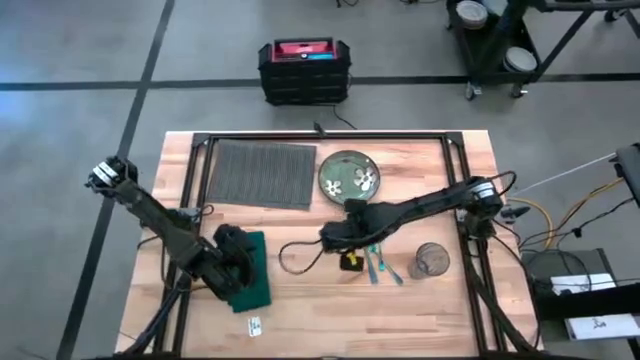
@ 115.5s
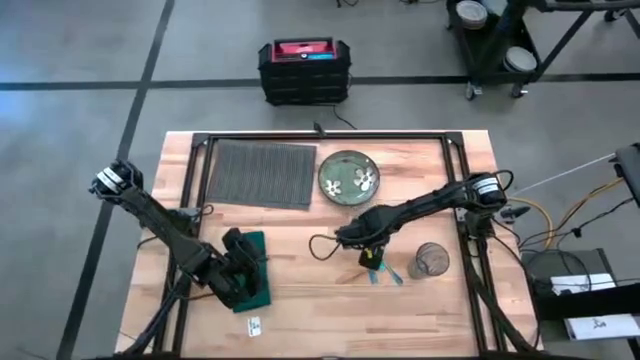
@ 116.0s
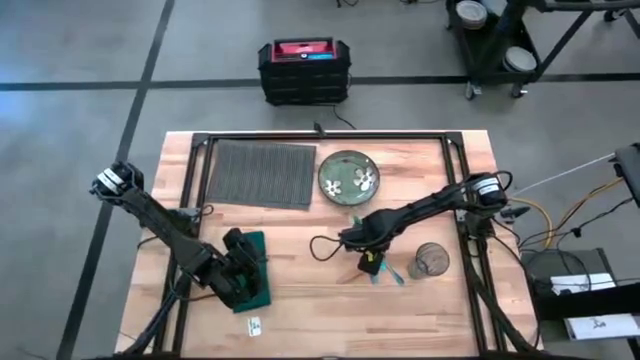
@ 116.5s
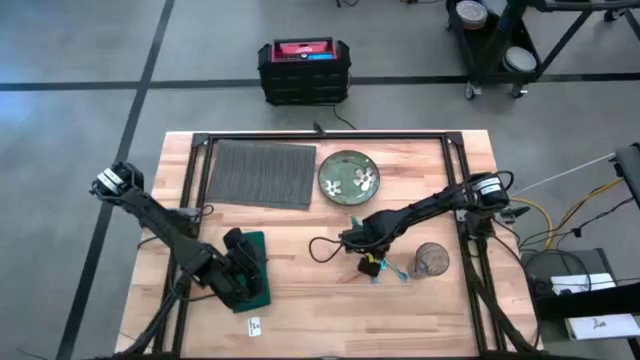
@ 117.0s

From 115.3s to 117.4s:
Task: Set table place
Put the iridescent blue fork on top of the green napkin

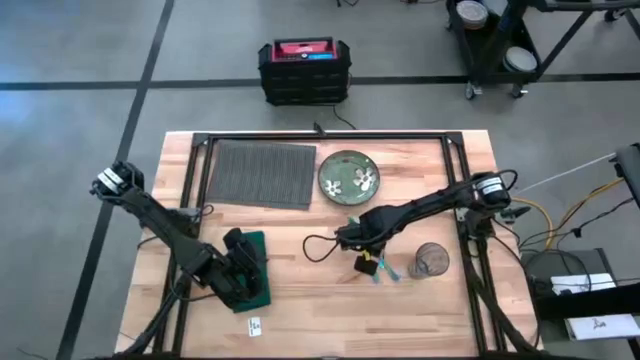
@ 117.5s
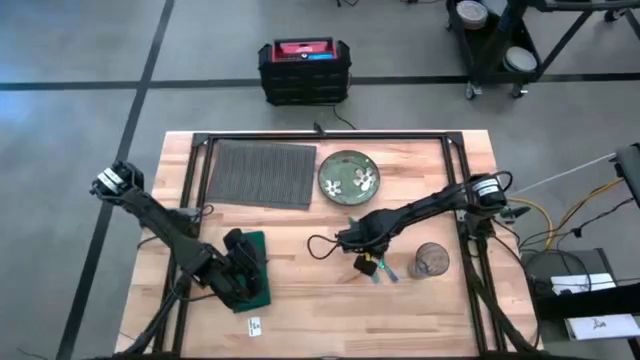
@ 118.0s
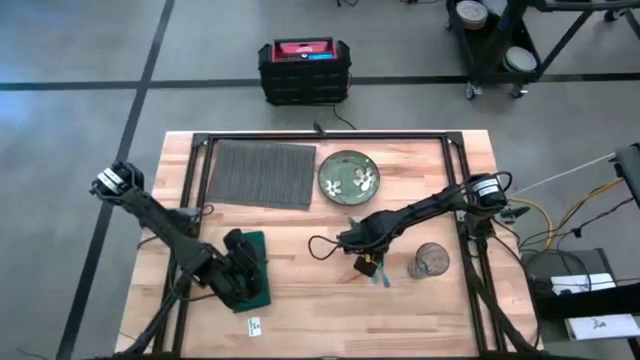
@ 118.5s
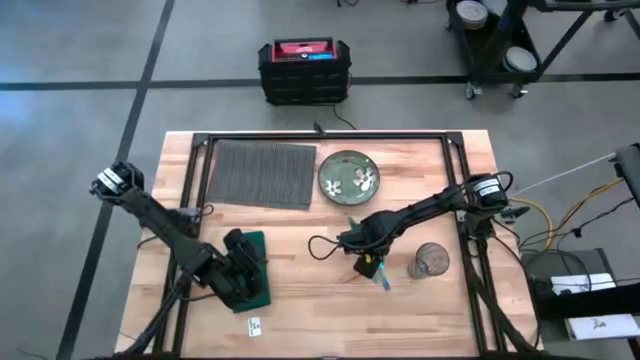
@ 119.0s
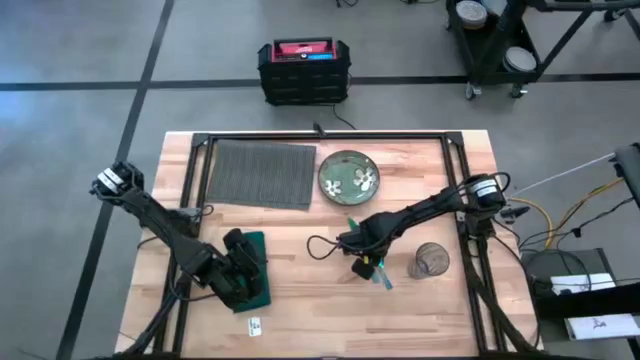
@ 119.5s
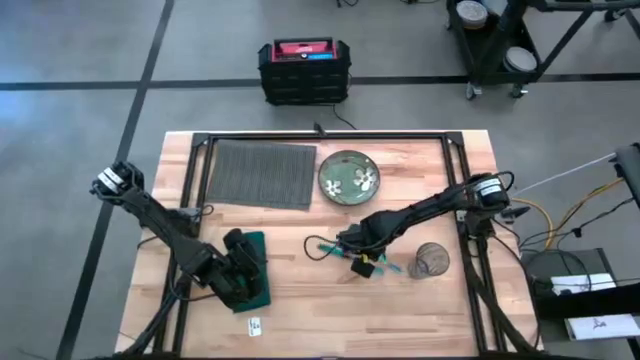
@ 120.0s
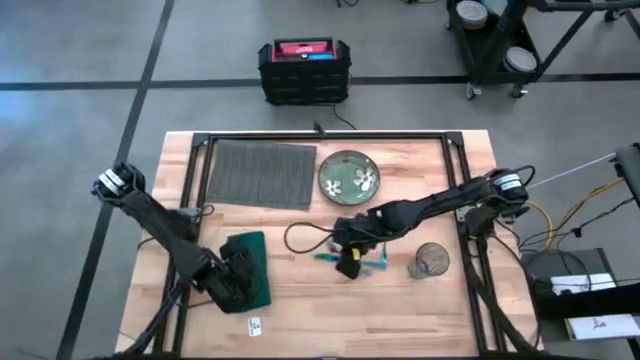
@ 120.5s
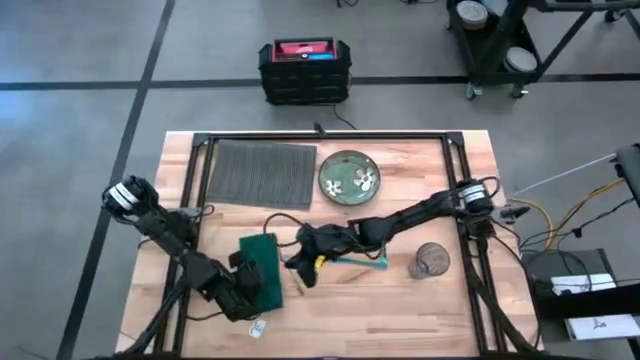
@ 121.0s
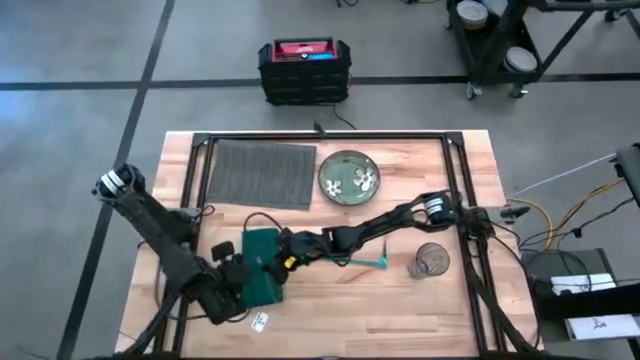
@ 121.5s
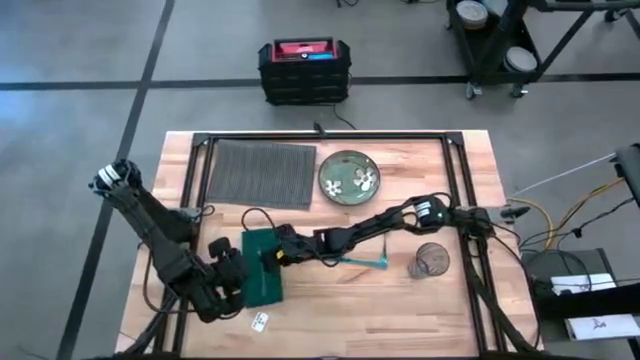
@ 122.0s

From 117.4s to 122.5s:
Put the iridescent blue fork on top of the green napkin

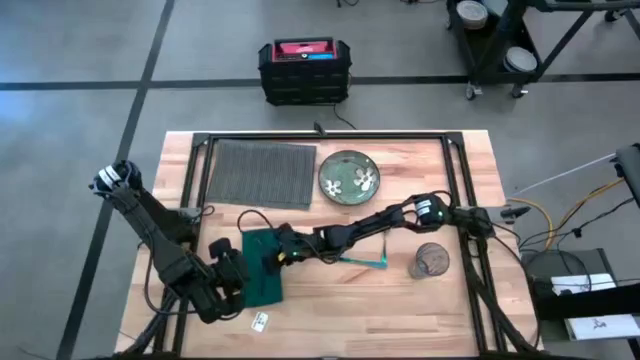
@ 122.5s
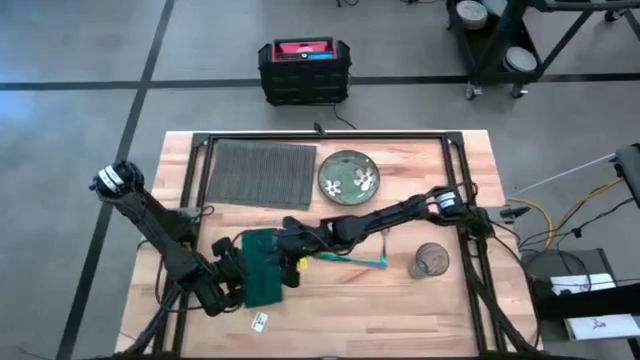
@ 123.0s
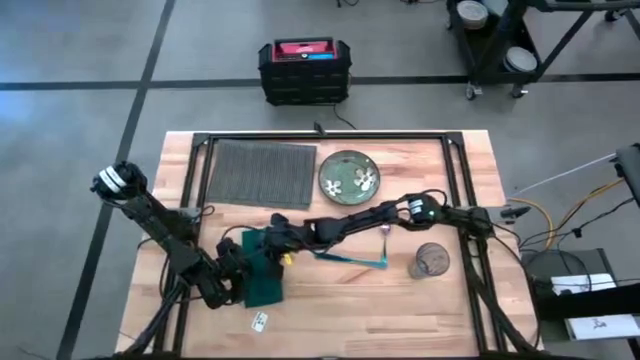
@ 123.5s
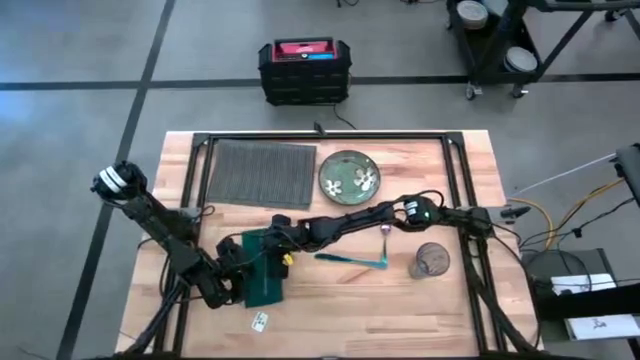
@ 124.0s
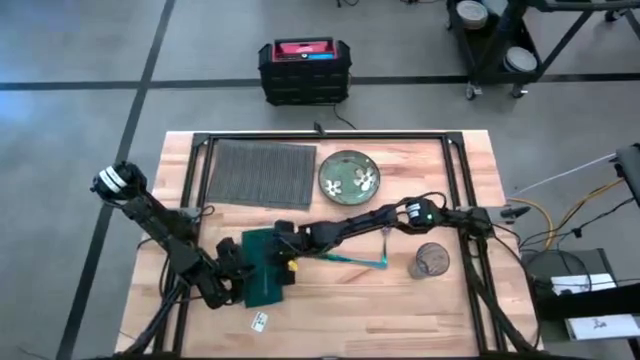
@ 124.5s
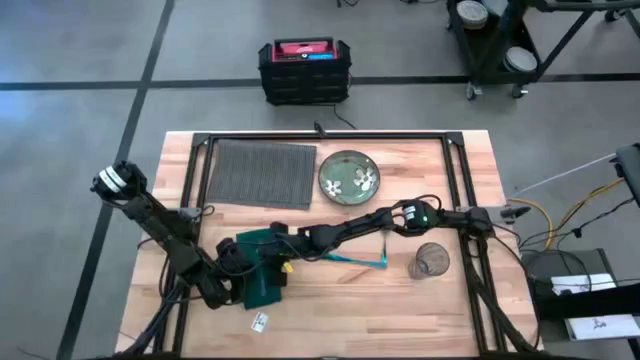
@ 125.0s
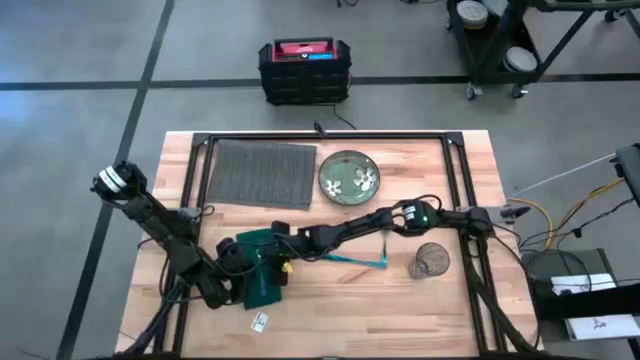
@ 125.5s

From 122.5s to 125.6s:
Adjust the iridescent blue fork

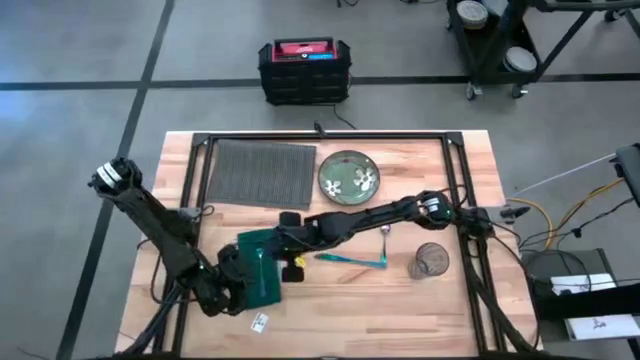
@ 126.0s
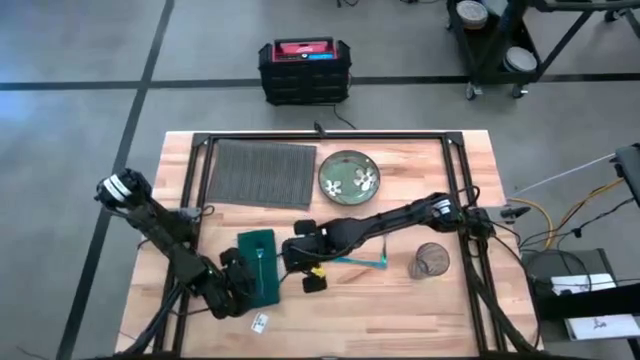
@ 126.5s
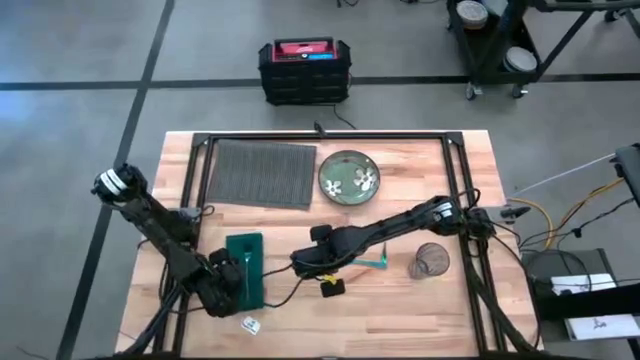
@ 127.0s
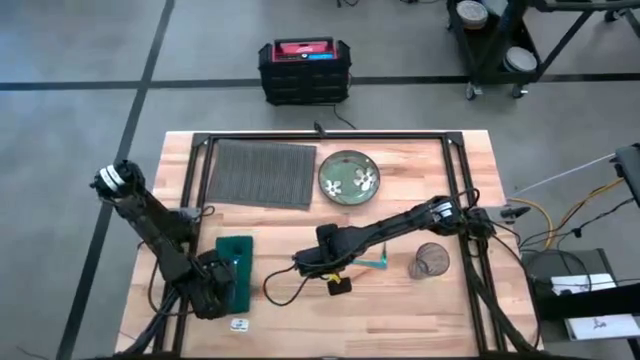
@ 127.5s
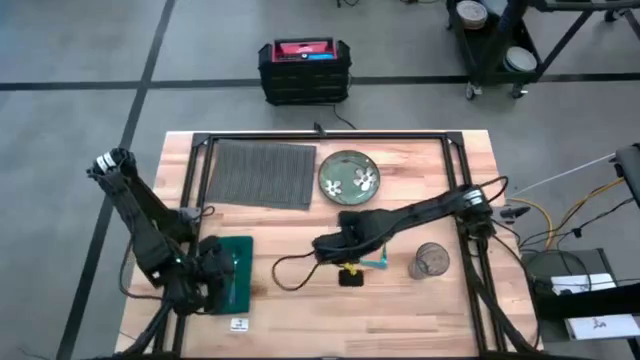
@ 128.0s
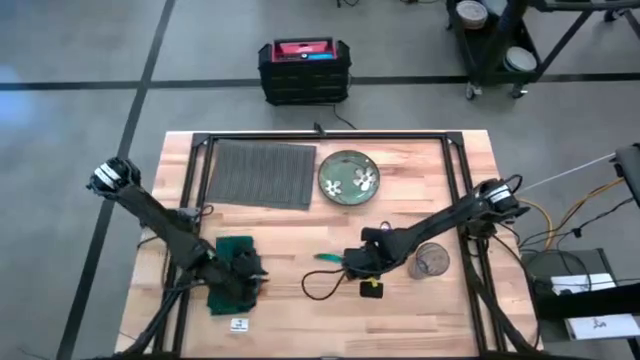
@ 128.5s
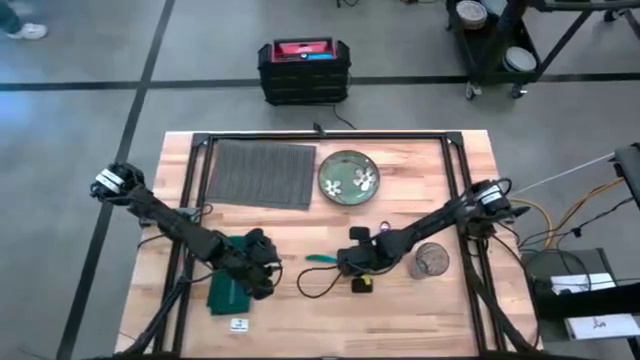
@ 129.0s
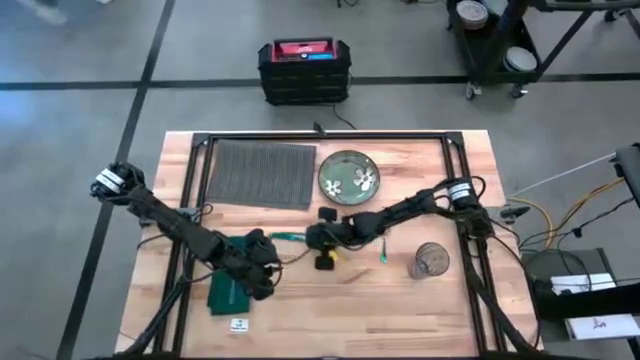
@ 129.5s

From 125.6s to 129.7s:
Adjust the iridescent blue knife

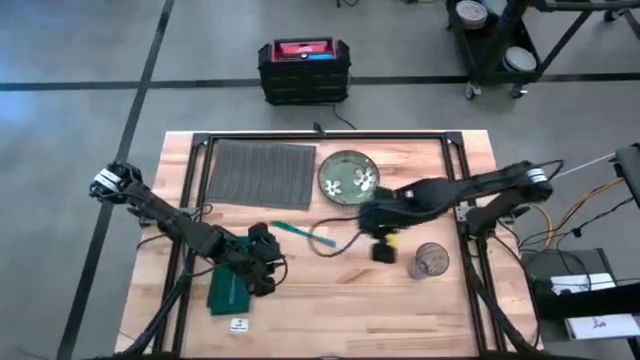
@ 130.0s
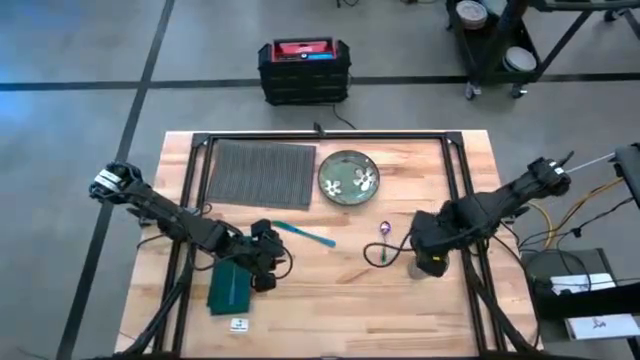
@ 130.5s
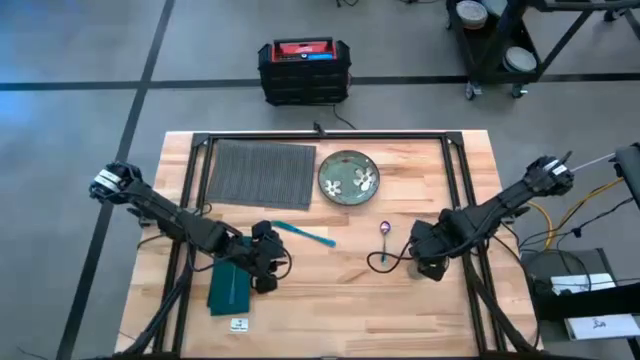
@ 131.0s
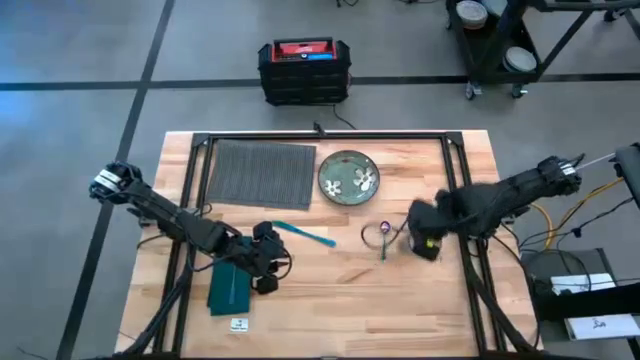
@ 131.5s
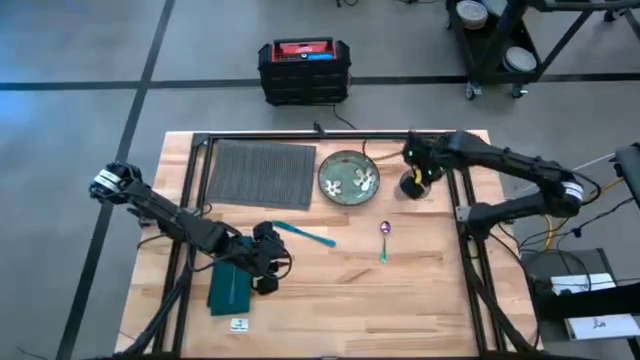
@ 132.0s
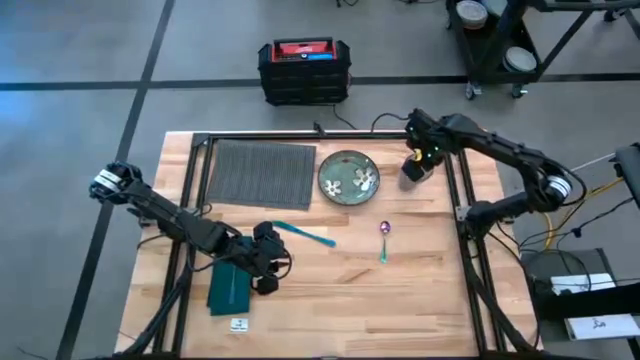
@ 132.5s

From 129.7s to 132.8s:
Move te blue transparent cup to the top right of the table

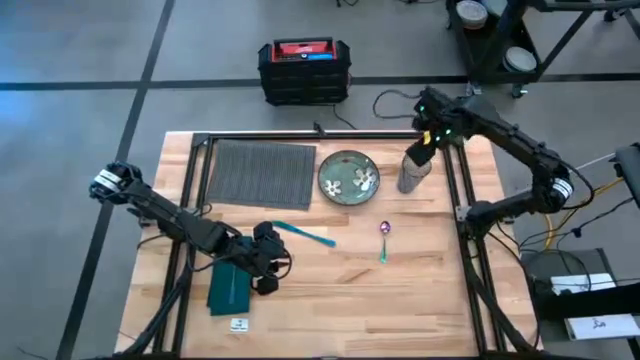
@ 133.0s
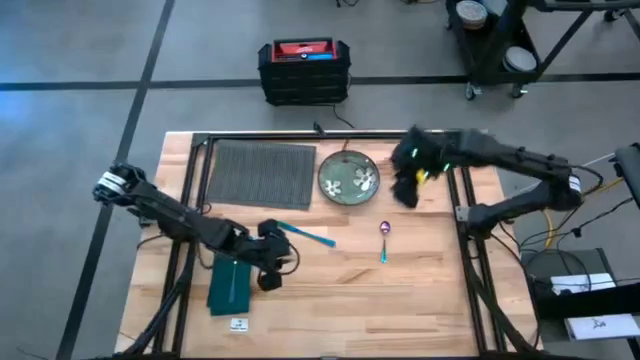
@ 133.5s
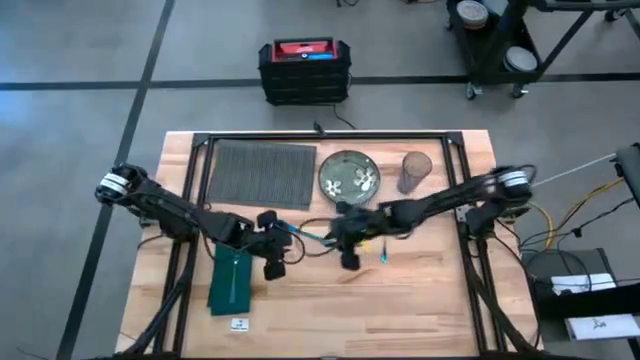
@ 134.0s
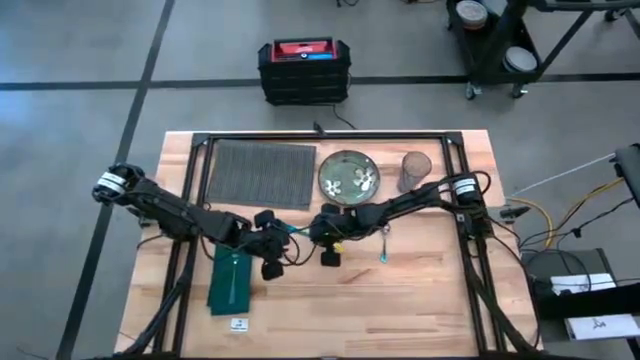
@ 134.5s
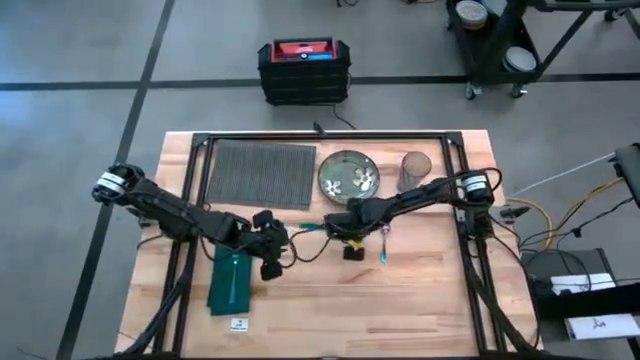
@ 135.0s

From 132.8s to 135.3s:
Move the iridescent blue knife to the center right of the table

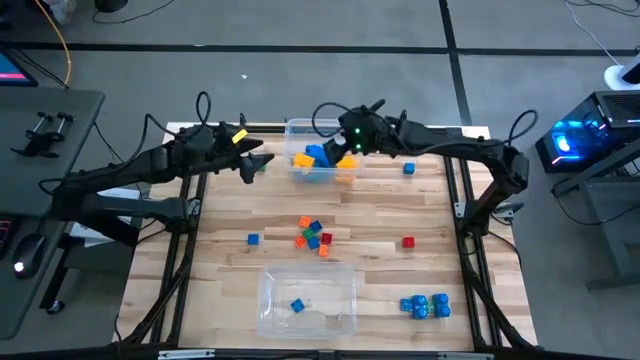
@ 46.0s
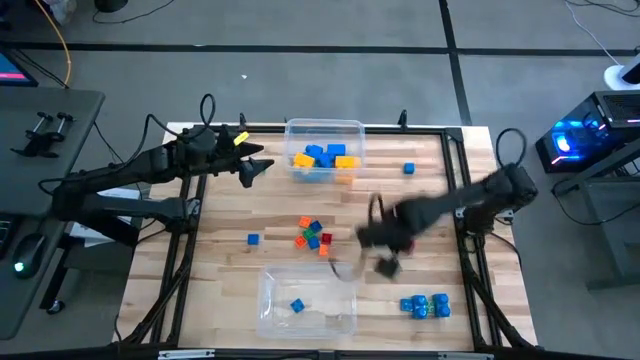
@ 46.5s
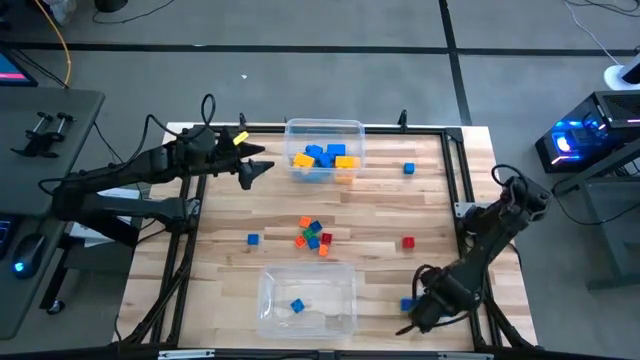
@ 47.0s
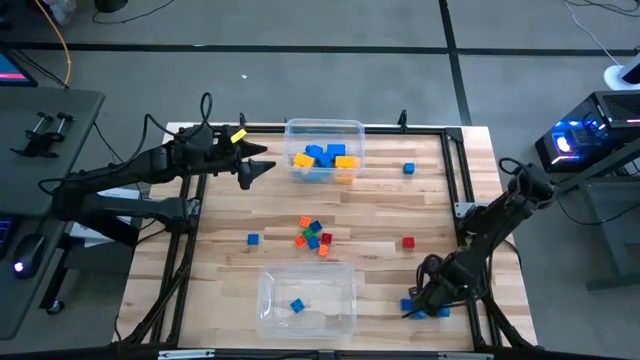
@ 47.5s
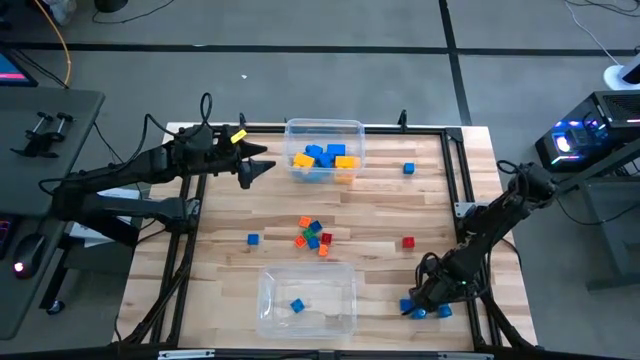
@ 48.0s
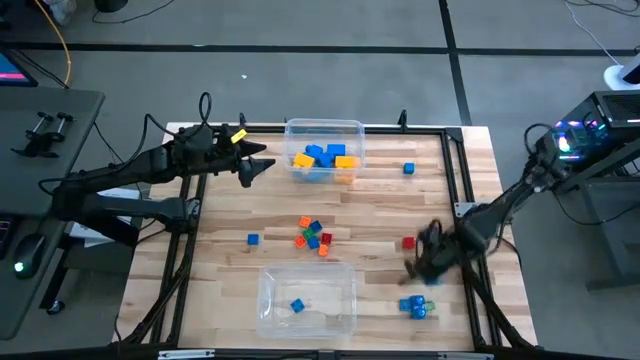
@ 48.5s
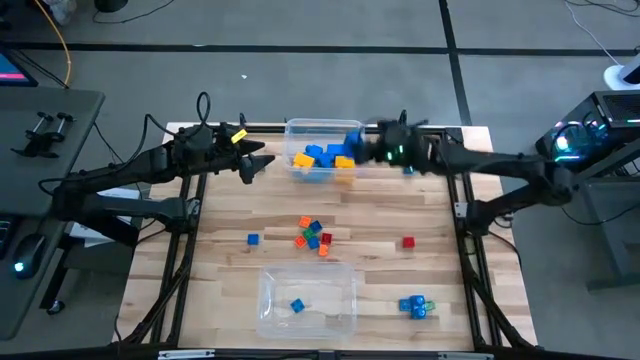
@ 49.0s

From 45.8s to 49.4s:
Task: Sort blocks by size
Put the large blue game piece into the top transparent bin
